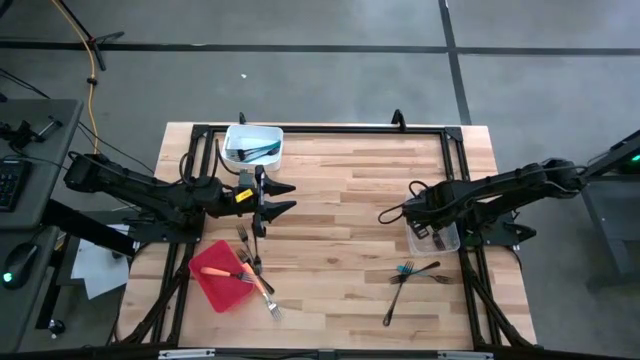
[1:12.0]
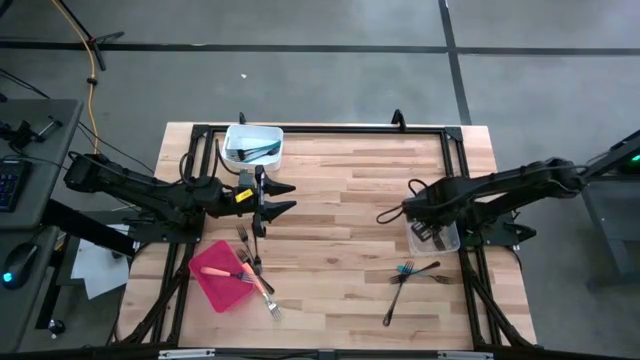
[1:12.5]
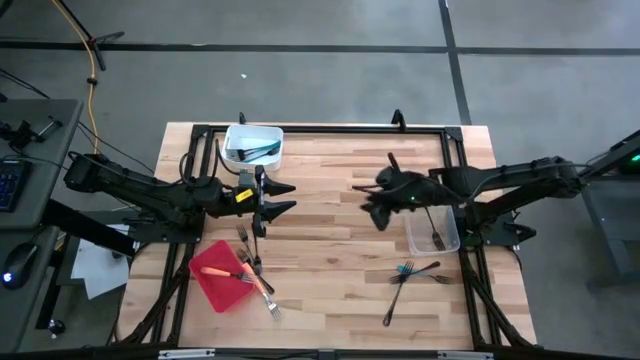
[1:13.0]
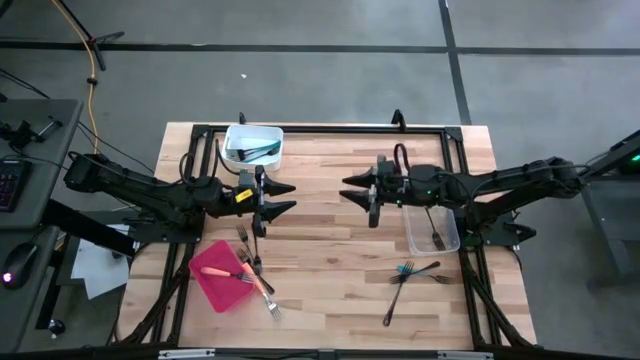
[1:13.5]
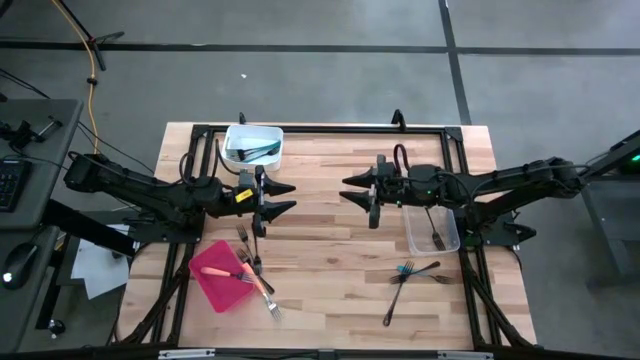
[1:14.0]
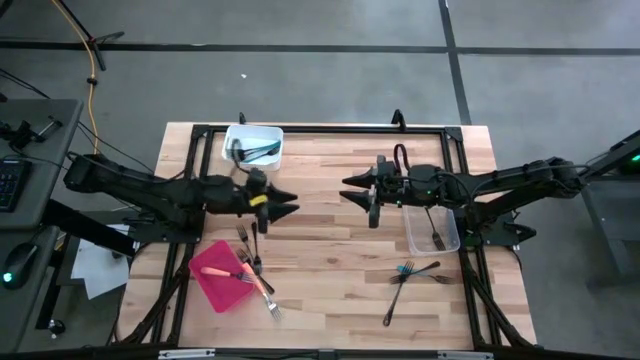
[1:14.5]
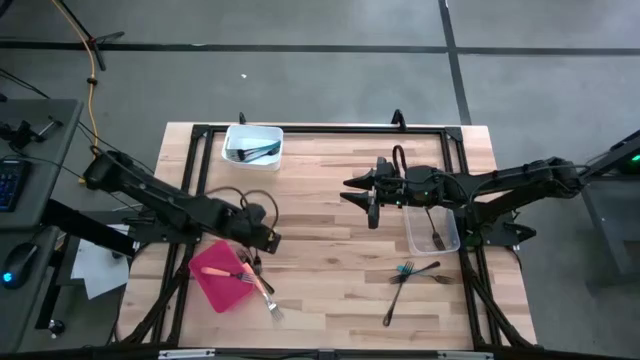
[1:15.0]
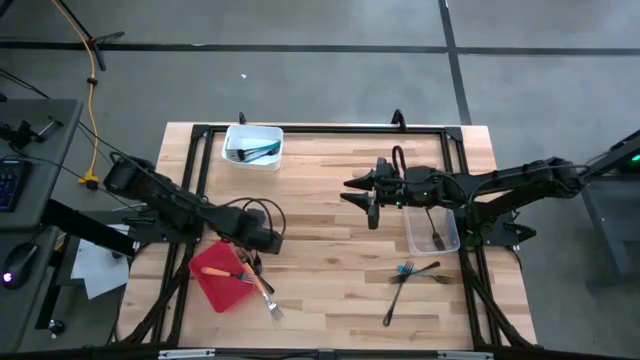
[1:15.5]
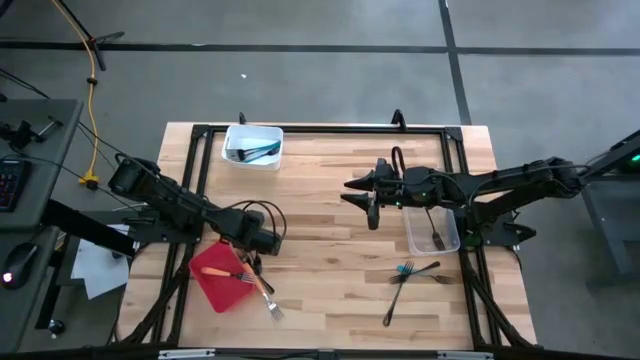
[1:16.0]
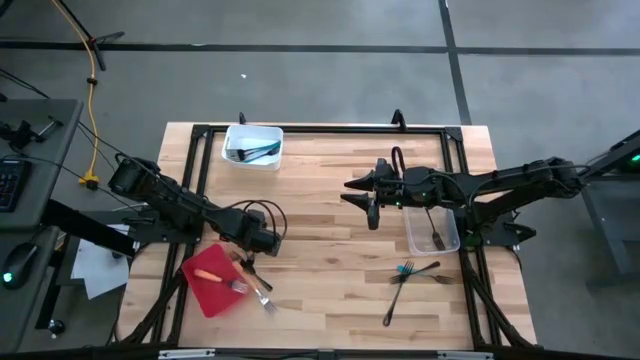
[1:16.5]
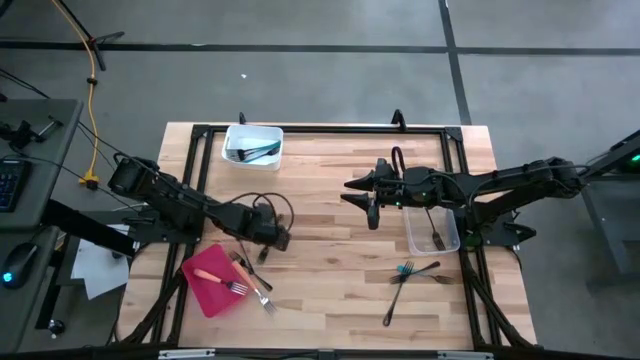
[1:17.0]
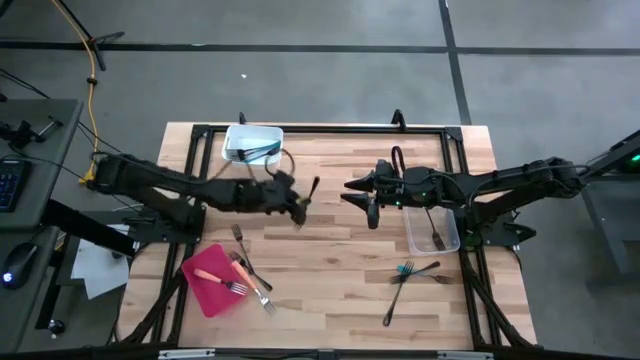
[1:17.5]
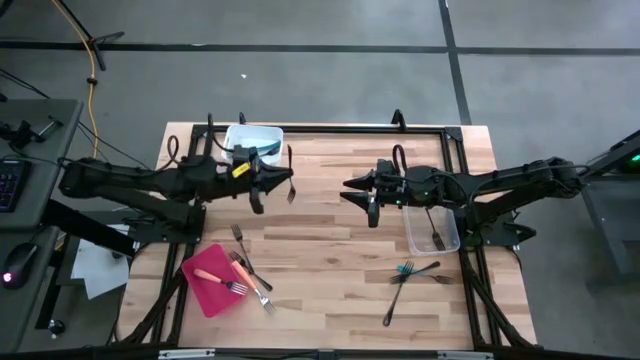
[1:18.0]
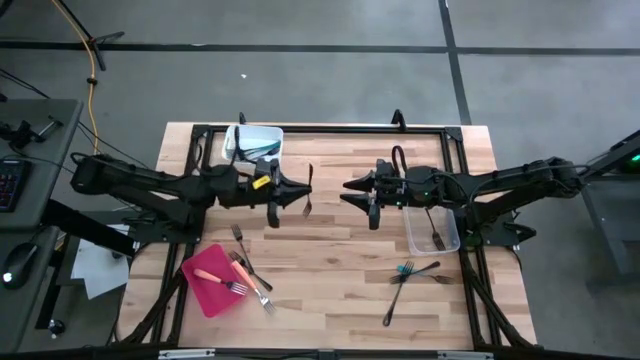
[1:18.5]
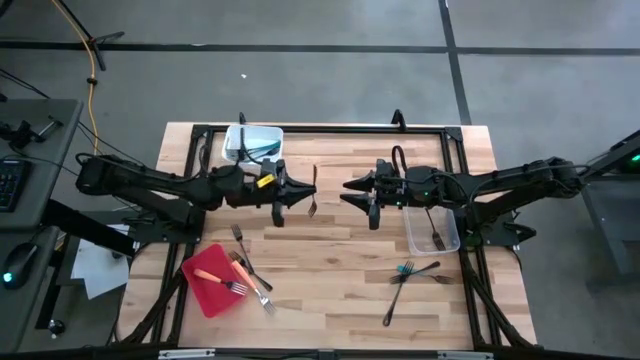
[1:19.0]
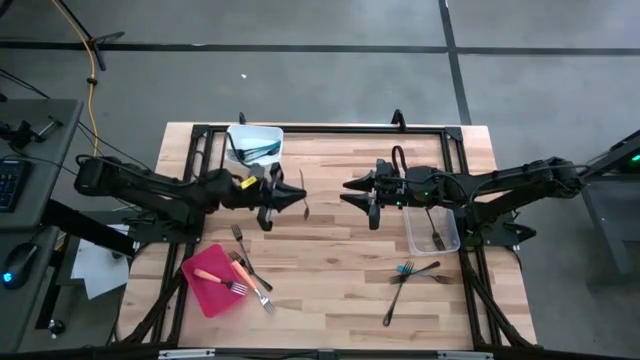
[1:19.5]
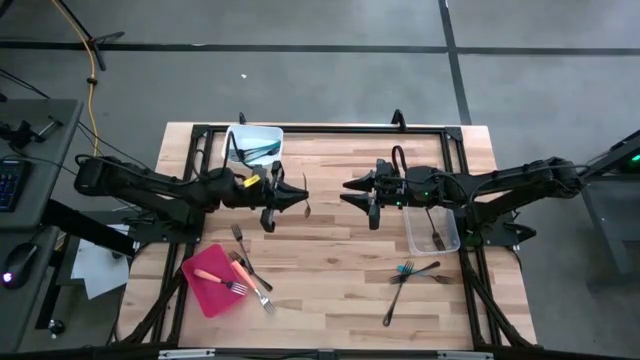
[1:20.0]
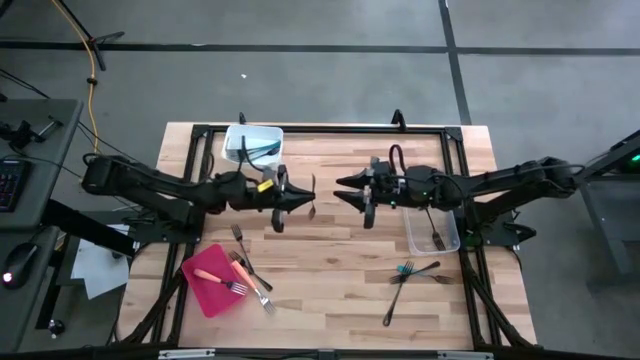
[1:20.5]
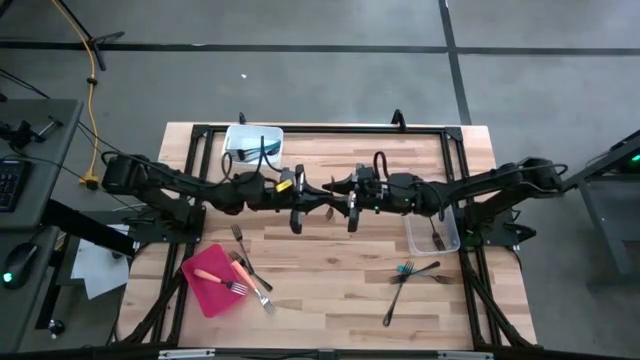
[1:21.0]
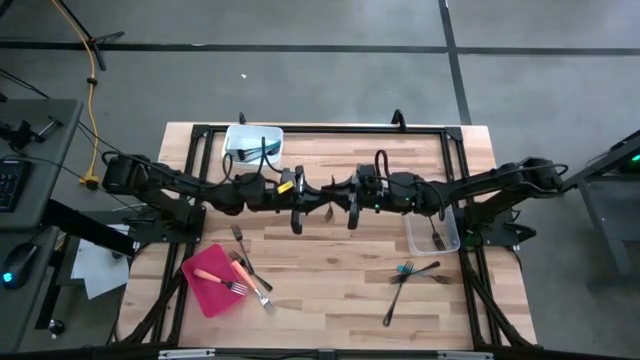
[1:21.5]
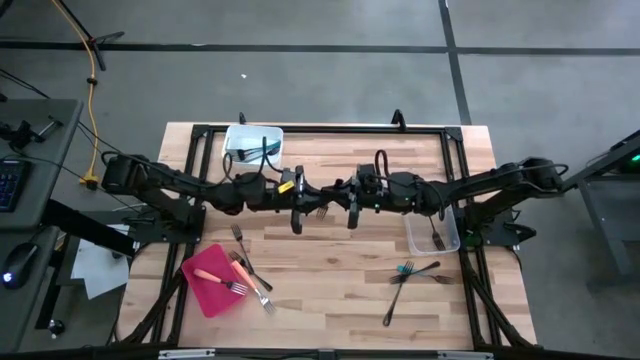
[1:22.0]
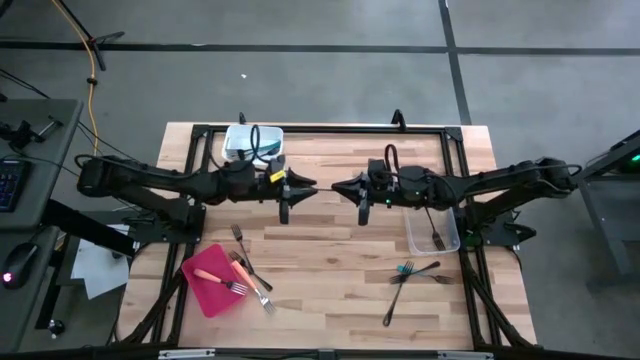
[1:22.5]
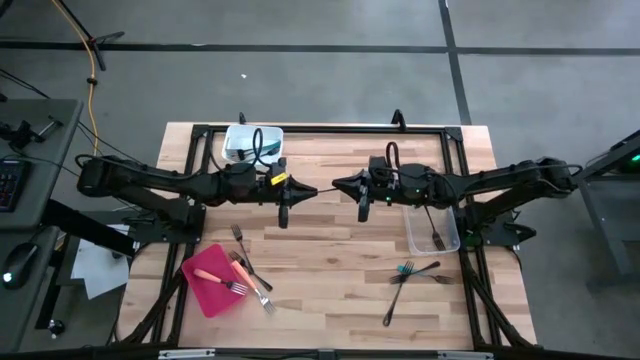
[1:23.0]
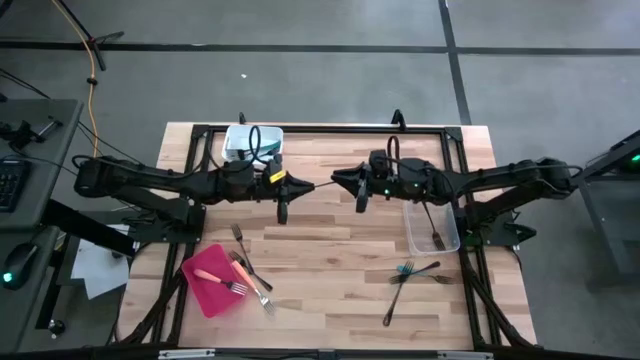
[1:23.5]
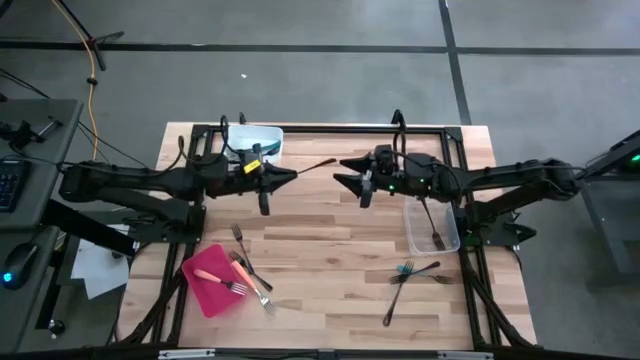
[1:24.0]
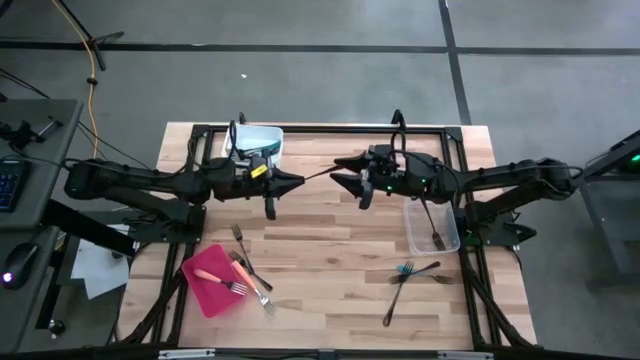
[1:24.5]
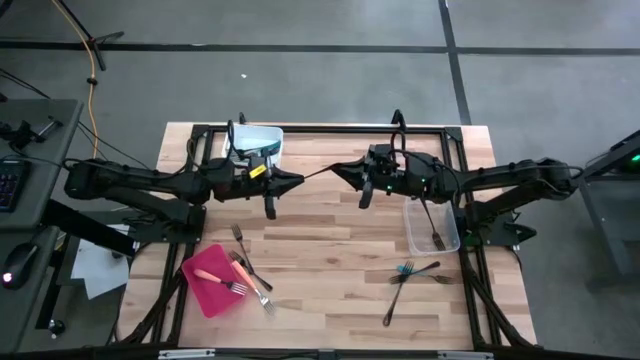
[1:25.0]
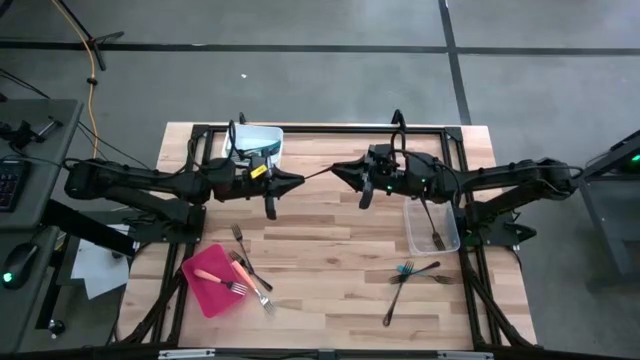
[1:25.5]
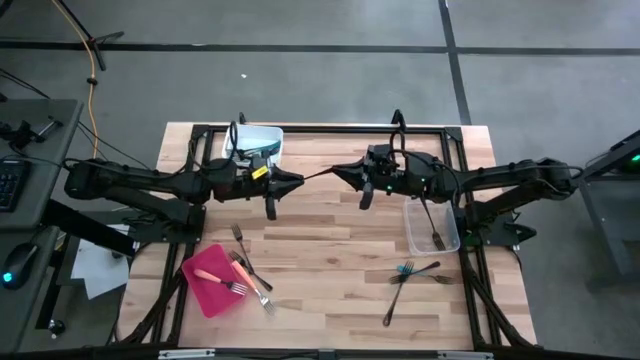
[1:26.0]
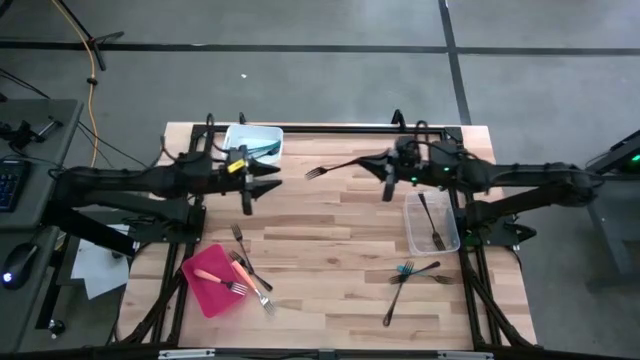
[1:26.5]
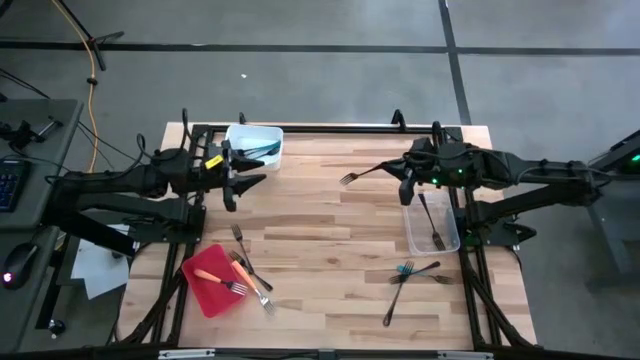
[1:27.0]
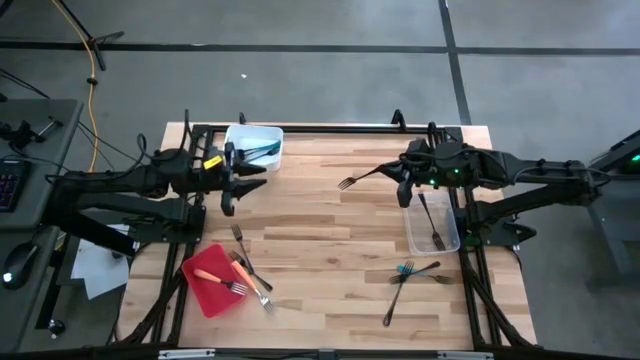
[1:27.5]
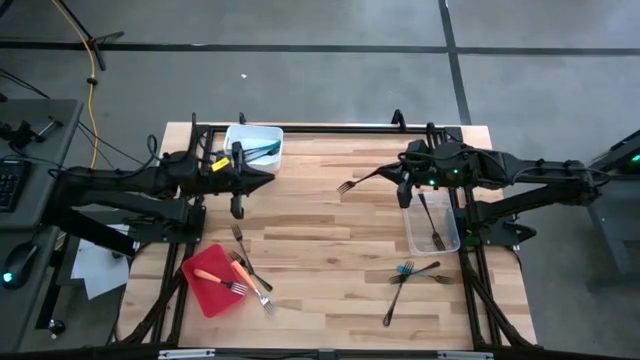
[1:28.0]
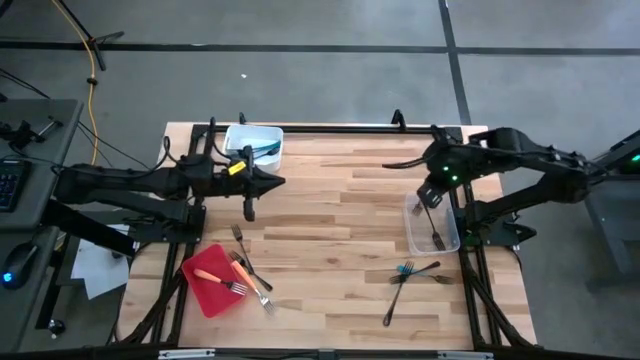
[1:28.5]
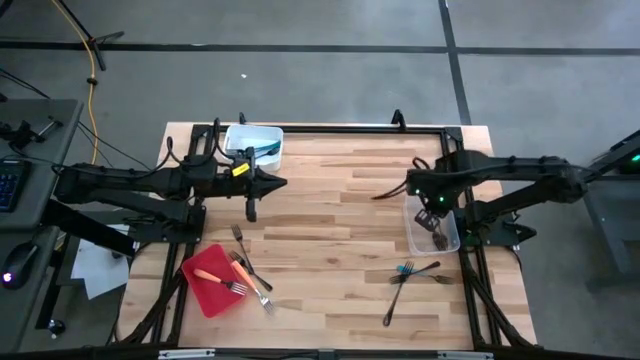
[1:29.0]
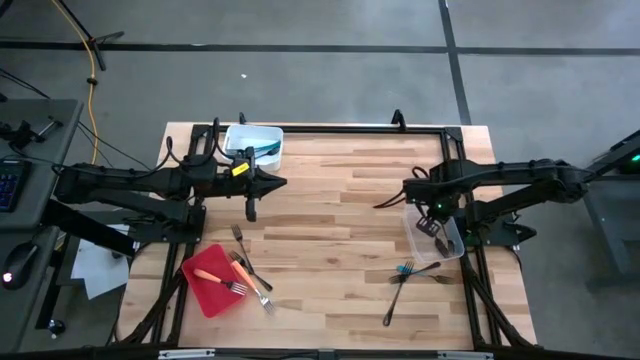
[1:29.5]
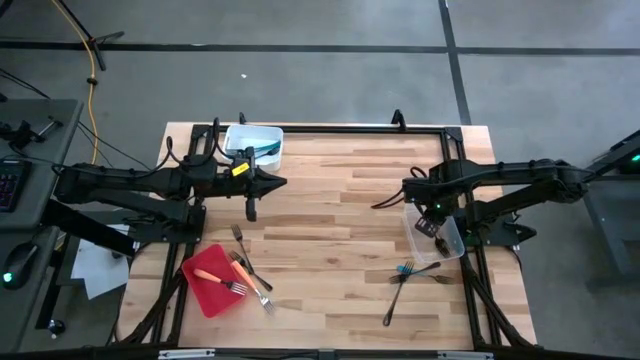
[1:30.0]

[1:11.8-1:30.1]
Task: Sort silverware by color (type)
Put the black fork into the transparent bin

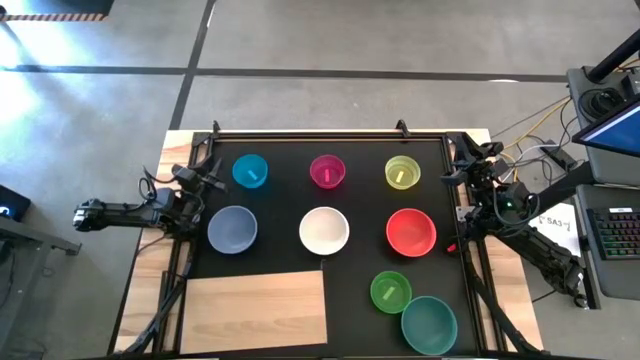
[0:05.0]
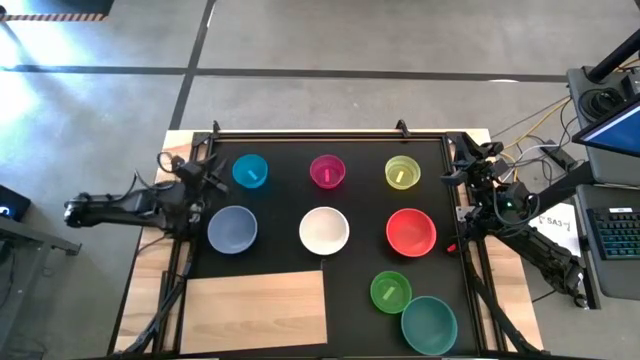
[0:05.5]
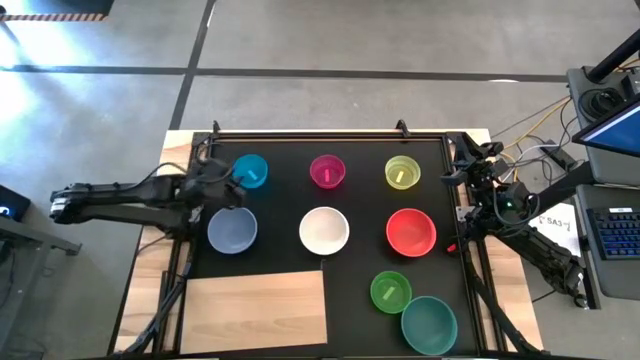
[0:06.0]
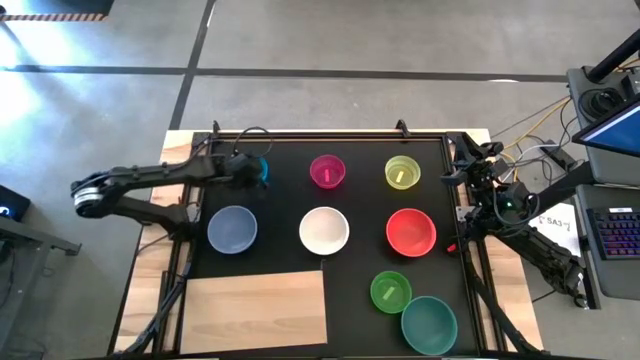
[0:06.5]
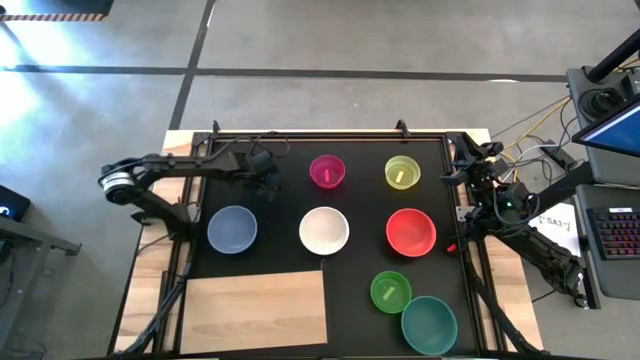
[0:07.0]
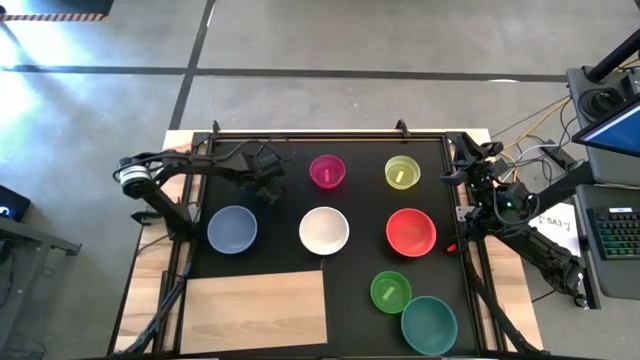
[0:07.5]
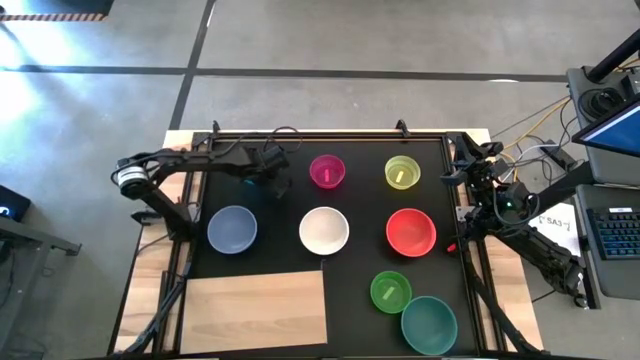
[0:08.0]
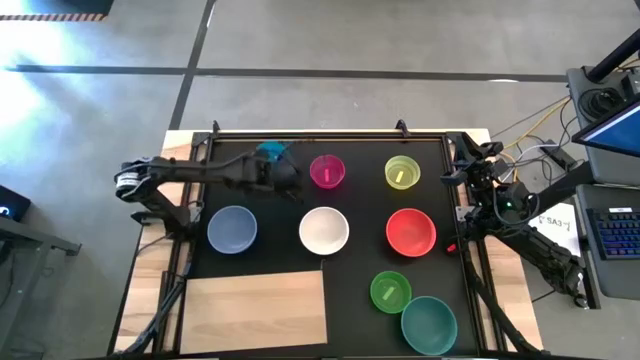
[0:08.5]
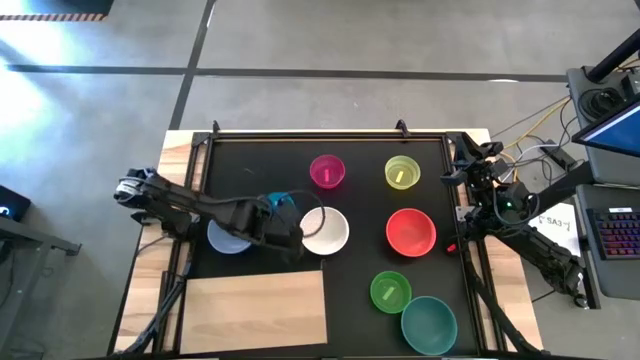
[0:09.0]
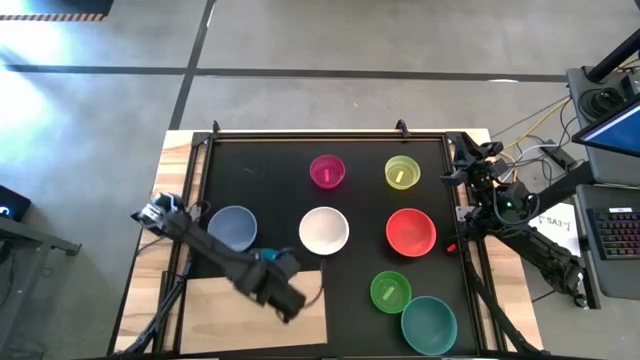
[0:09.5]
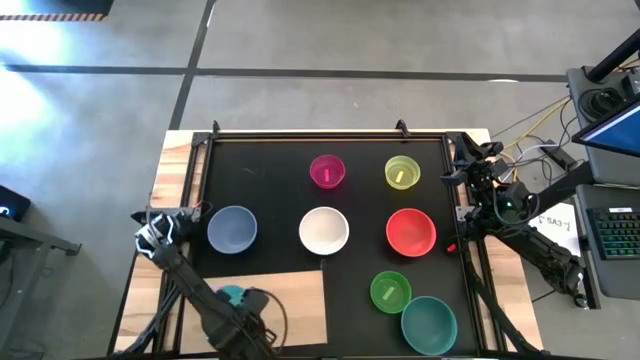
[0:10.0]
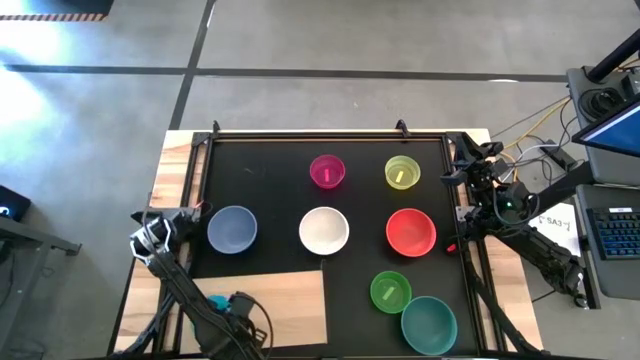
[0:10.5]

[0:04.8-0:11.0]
Task: Place and stack bowls onto a shelf
Put the blue bowl on the shelf
